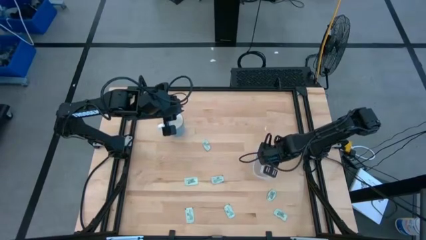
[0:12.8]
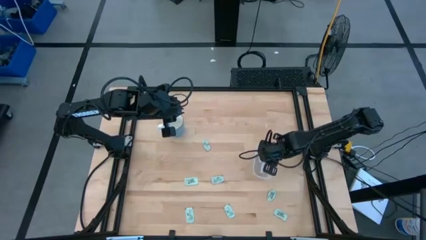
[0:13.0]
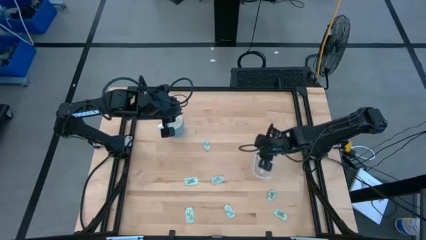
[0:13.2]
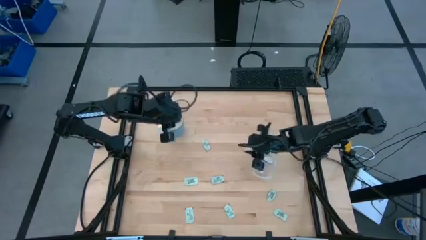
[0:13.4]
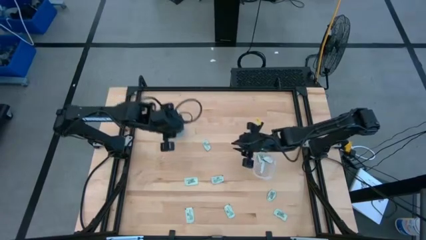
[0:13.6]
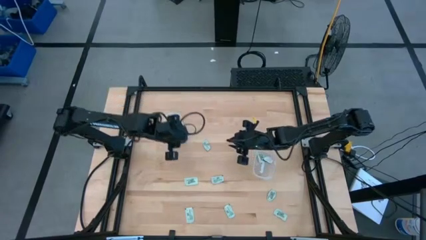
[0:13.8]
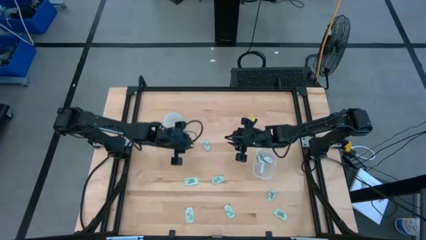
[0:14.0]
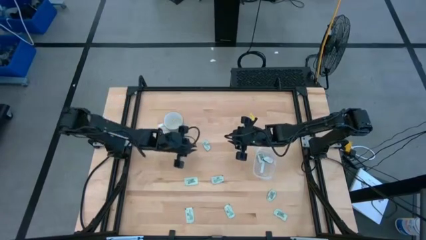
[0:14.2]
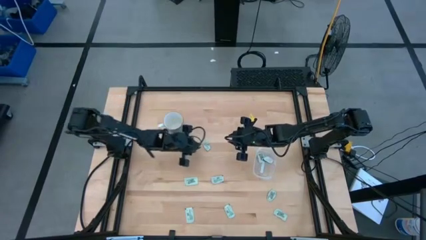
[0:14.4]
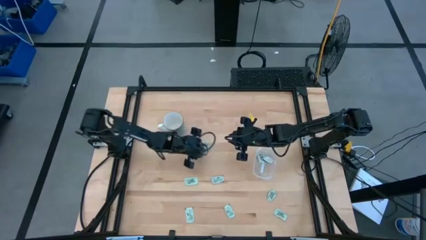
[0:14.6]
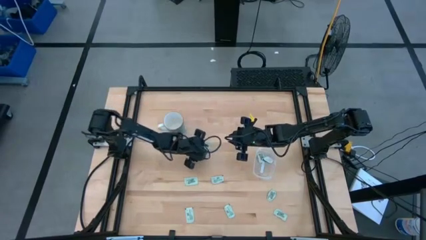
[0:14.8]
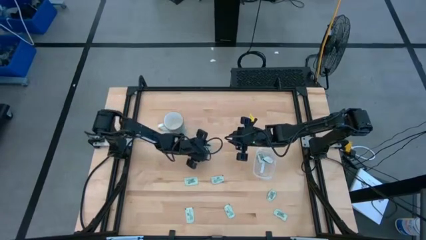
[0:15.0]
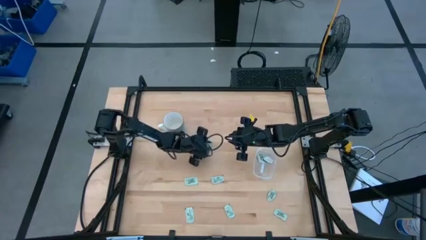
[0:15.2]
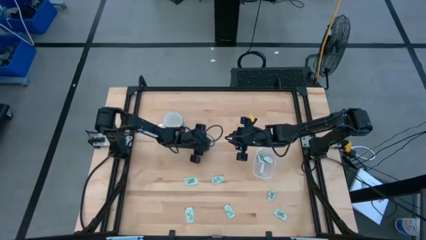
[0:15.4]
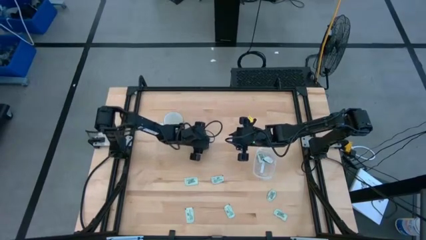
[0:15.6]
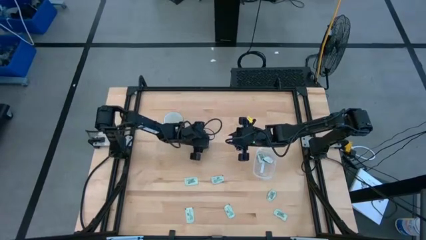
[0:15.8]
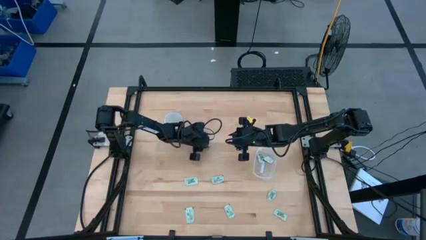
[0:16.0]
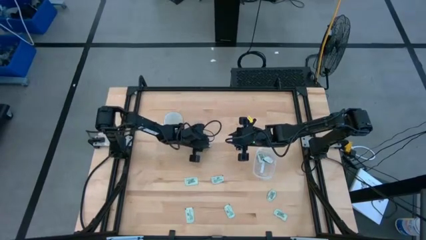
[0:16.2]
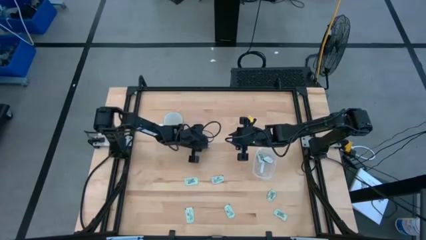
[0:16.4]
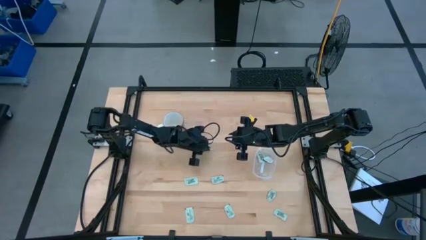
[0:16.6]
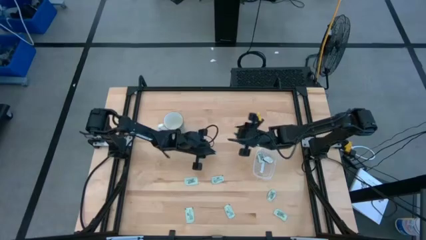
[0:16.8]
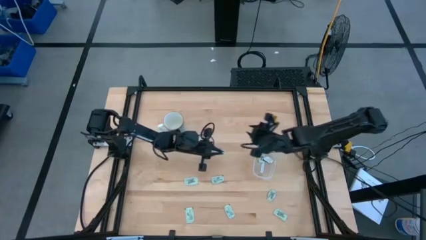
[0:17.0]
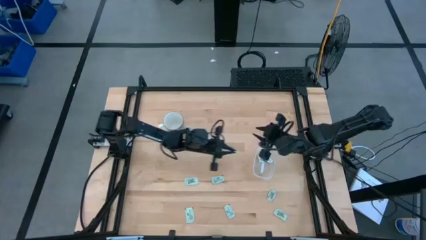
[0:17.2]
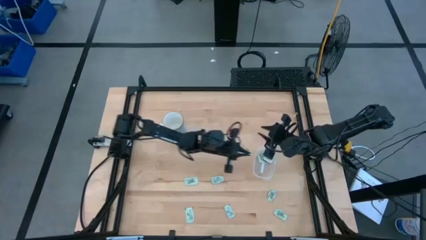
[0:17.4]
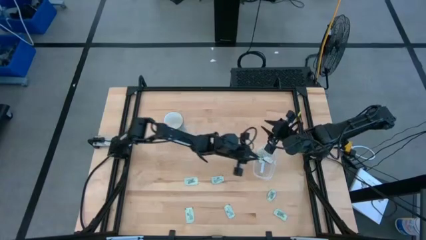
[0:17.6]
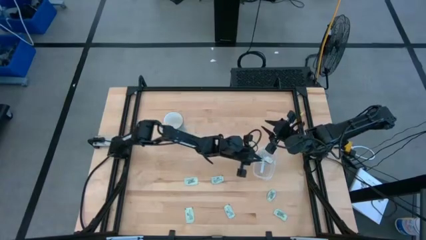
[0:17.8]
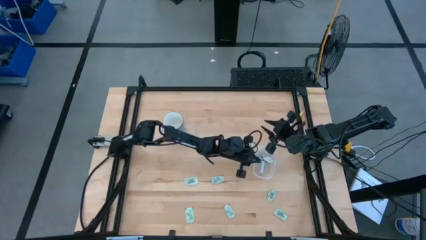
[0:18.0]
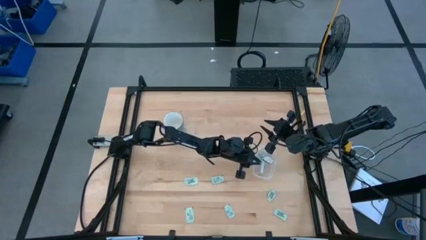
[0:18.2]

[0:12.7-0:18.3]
Task: Pick and place Stevia / Truvia into bins
Put the stevia packet into the container

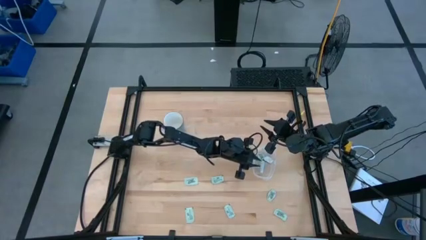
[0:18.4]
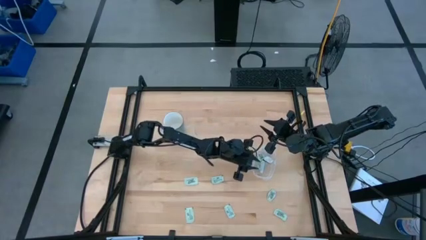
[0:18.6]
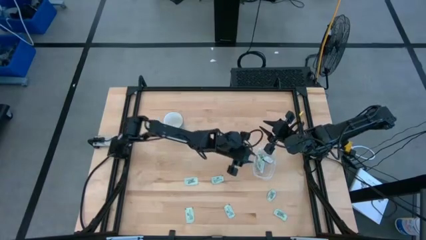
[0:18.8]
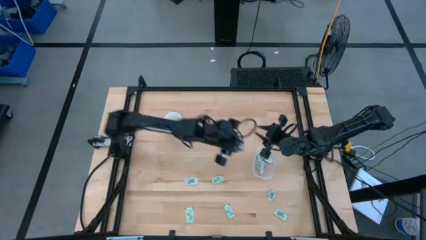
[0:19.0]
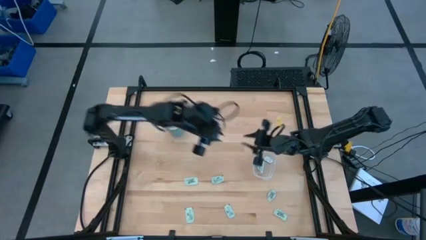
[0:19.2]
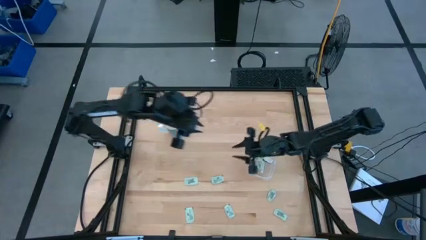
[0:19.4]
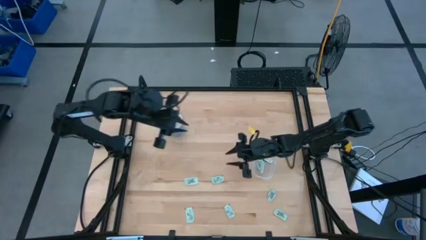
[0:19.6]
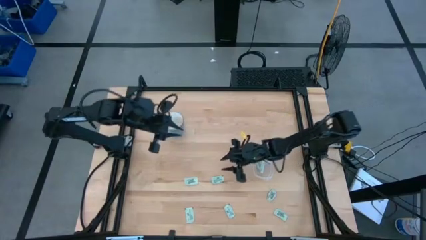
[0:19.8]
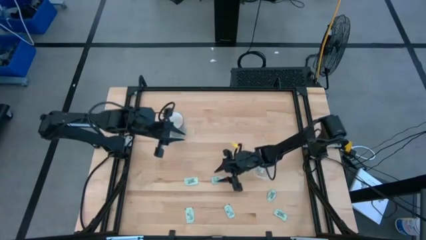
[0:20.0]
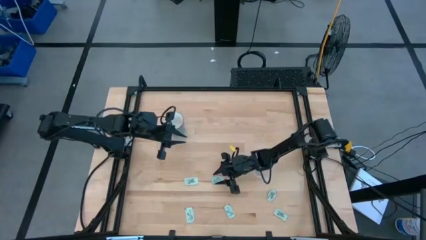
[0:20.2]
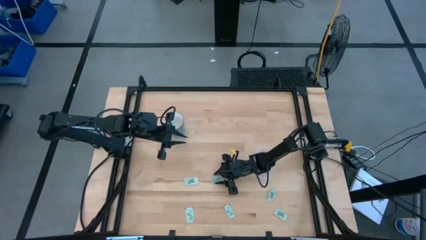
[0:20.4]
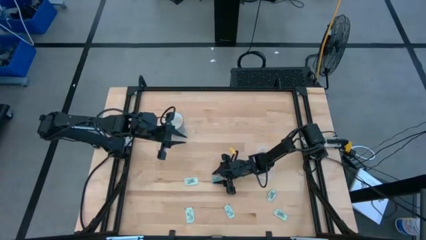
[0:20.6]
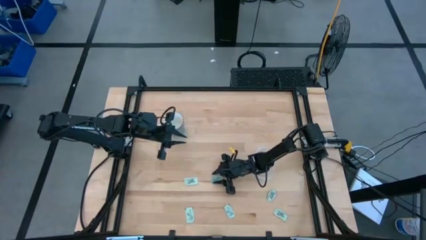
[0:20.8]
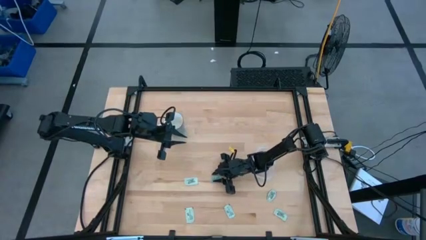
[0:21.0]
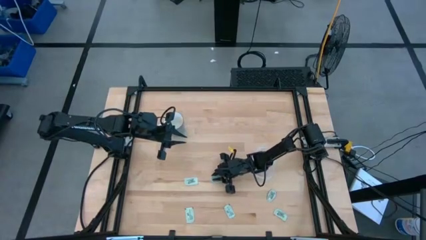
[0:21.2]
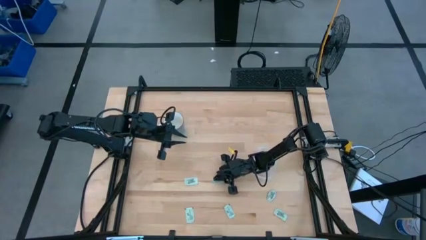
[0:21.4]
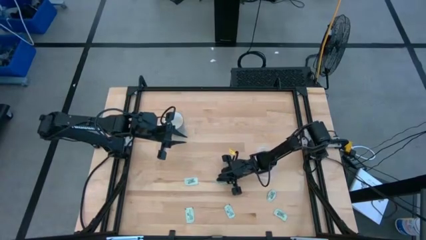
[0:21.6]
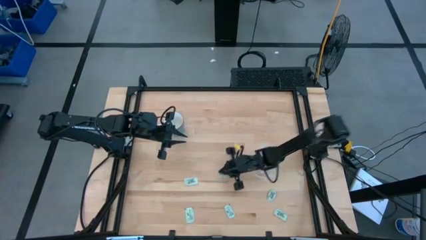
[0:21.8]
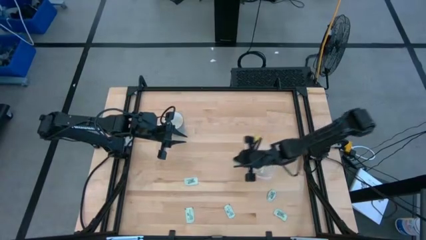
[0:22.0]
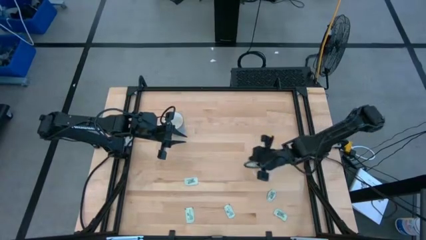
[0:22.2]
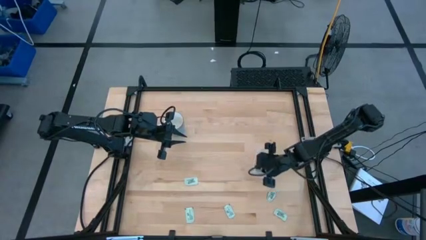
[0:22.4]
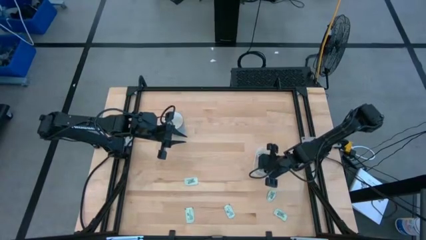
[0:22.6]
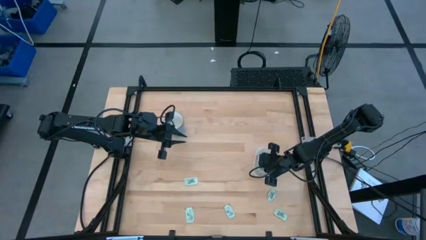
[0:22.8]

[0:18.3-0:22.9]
Put the stevia packet into the container

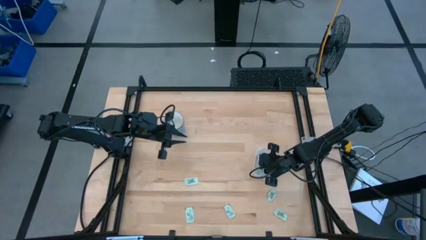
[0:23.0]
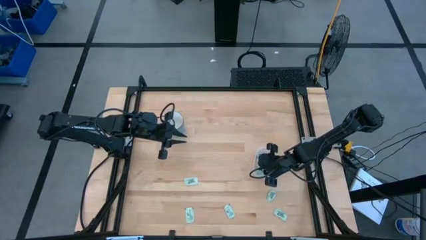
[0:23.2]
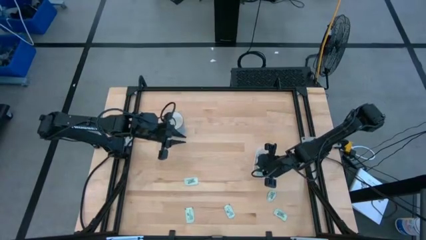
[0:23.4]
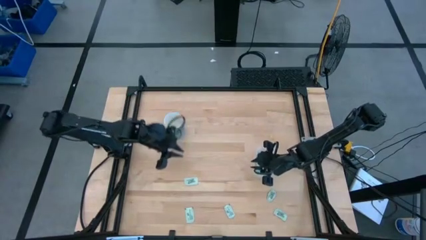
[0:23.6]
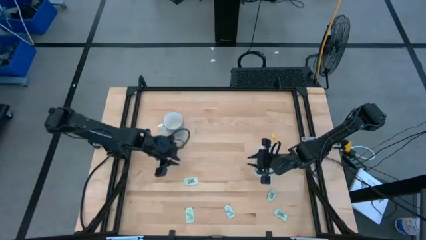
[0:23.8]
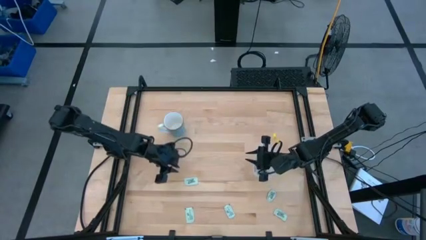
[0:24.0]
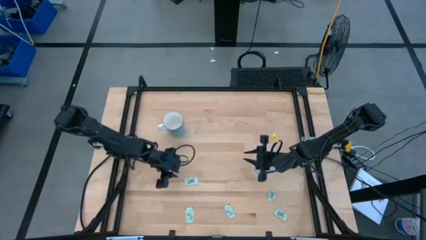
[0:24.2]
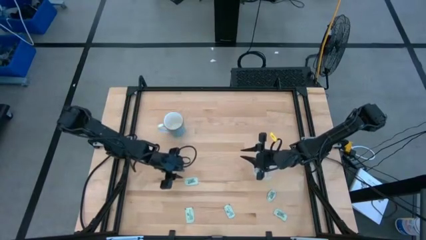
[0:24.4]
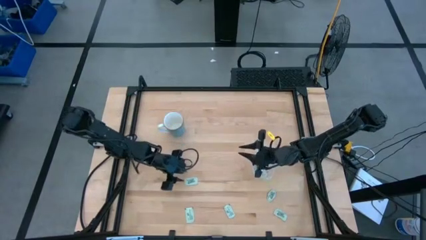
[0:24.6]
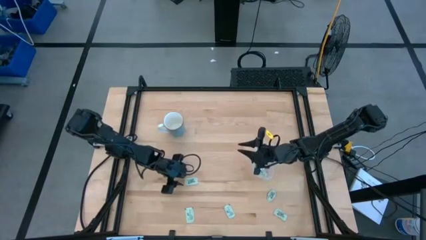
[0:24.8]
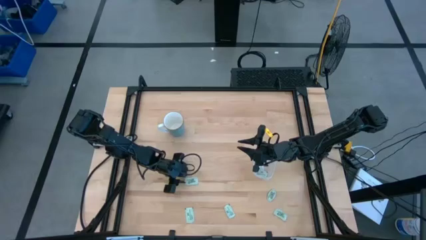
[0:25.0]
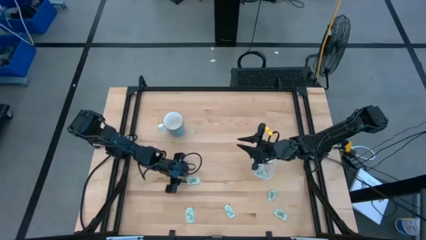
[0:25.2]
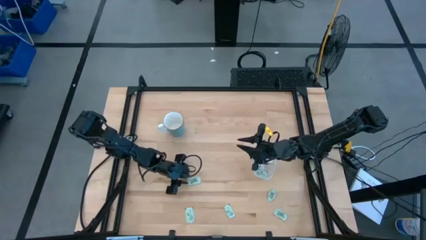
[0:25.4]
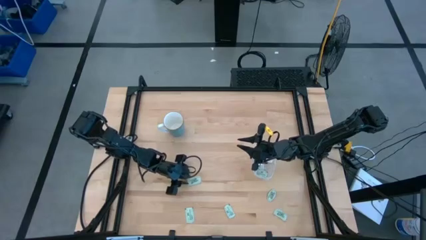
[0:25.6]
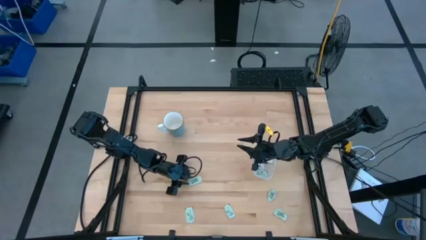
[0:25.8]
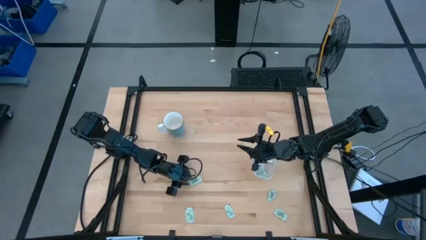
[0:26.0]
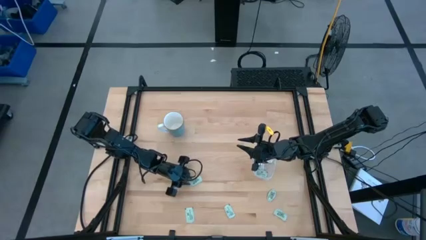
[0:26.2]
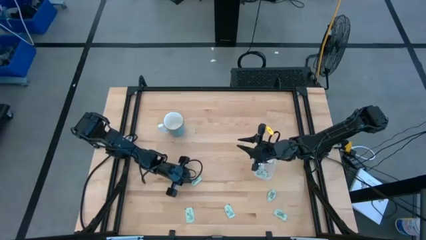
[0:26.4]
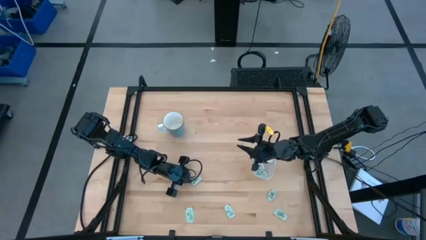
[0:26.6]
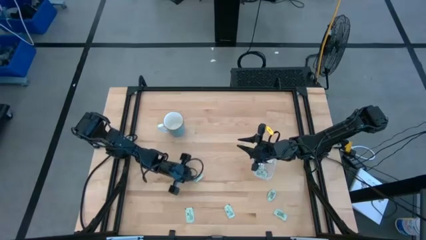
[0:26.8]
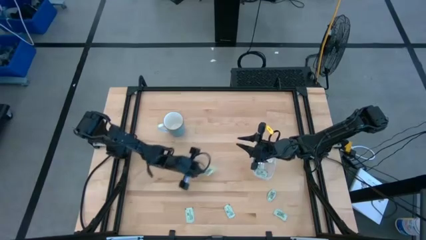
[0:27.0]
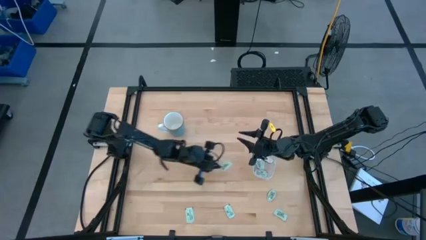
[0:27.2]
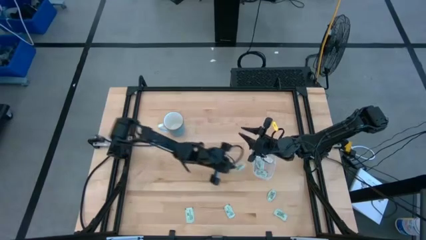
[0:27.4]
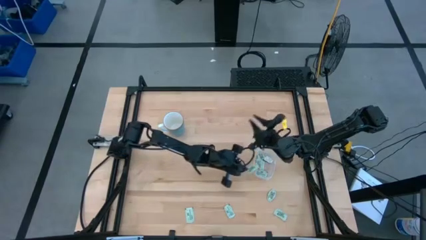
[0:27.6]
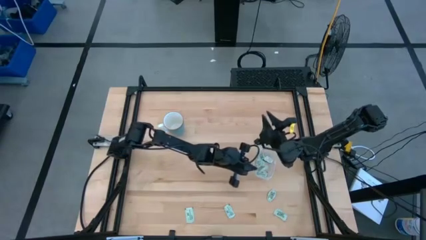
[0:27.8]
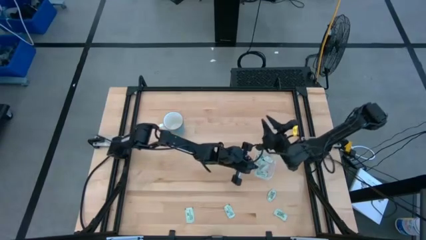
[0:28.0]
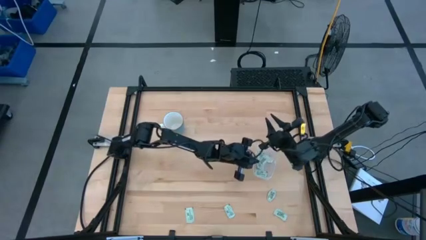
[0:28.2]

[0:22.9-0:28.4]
Put the stevia packet into the container
